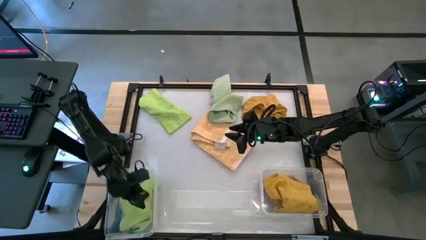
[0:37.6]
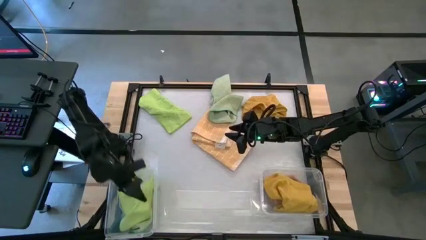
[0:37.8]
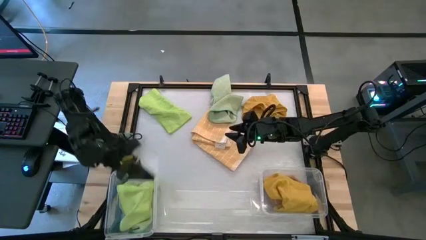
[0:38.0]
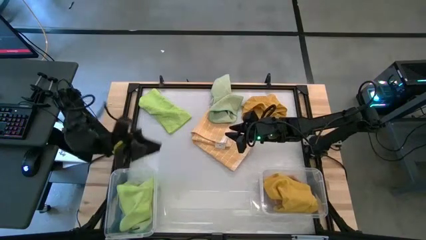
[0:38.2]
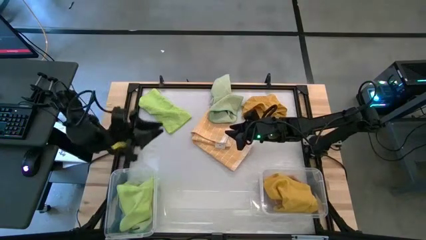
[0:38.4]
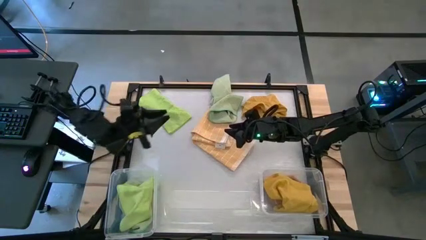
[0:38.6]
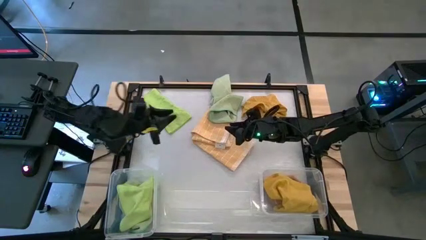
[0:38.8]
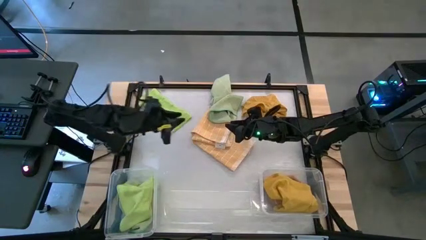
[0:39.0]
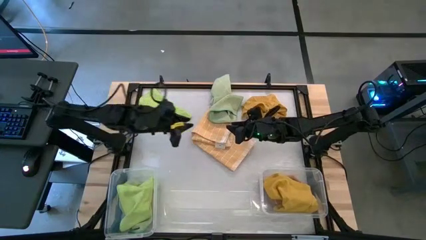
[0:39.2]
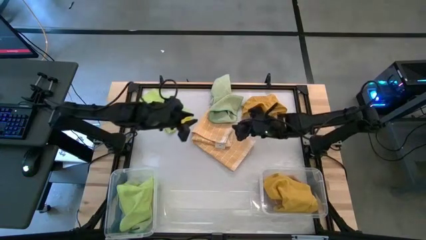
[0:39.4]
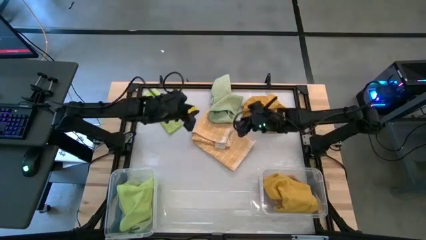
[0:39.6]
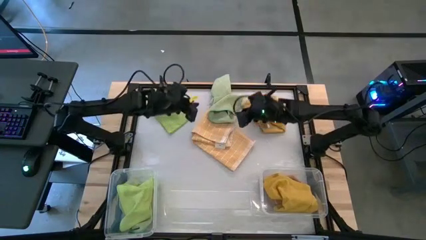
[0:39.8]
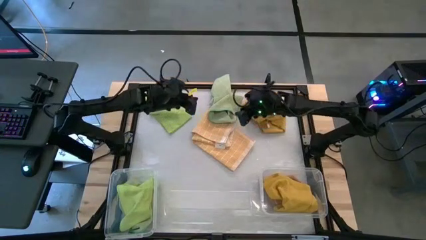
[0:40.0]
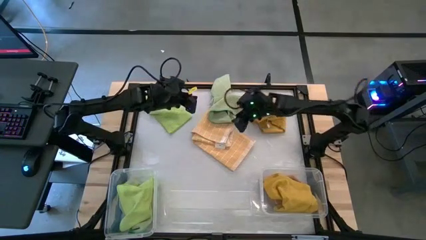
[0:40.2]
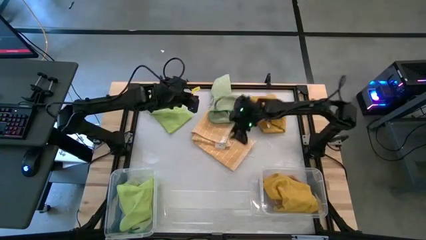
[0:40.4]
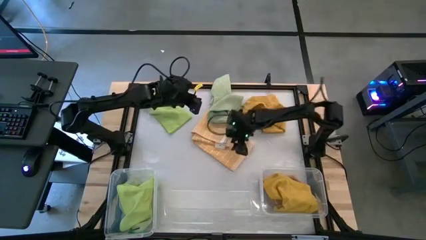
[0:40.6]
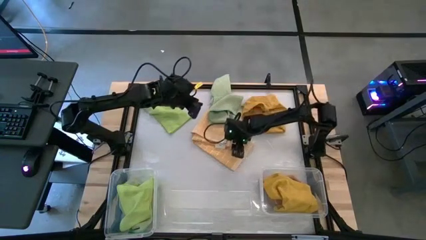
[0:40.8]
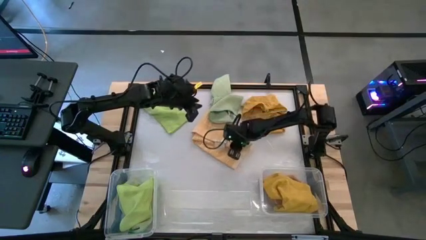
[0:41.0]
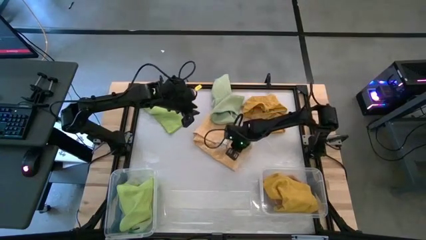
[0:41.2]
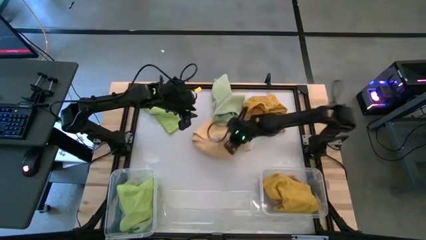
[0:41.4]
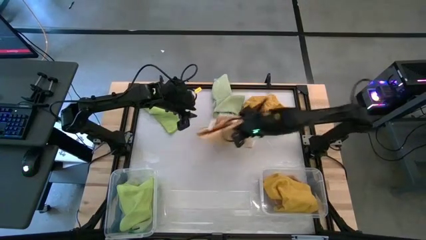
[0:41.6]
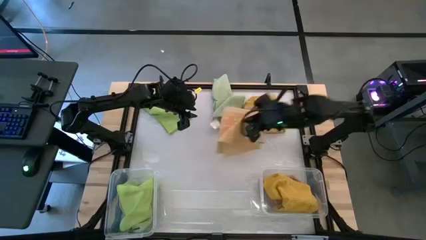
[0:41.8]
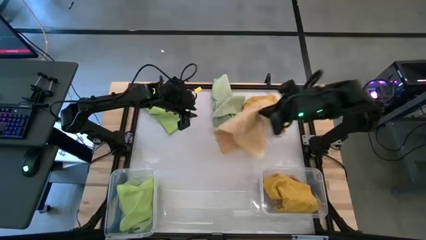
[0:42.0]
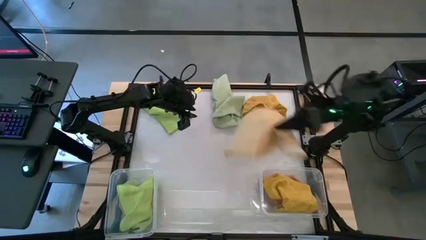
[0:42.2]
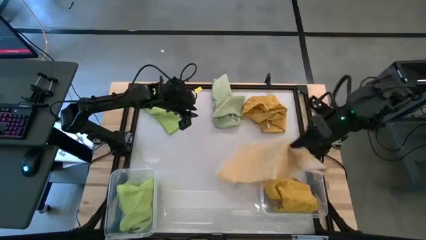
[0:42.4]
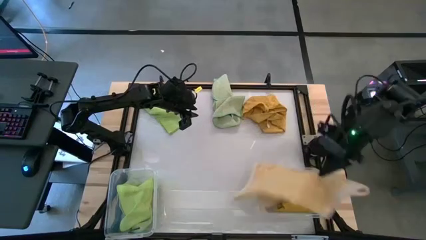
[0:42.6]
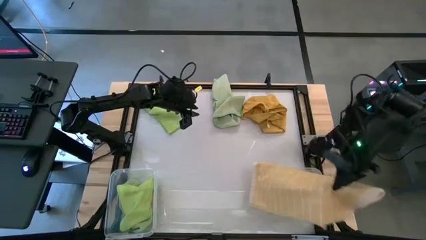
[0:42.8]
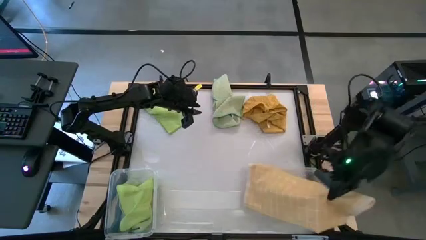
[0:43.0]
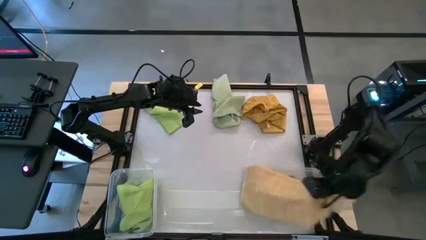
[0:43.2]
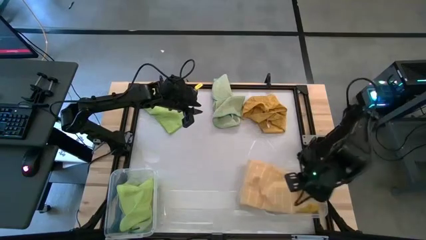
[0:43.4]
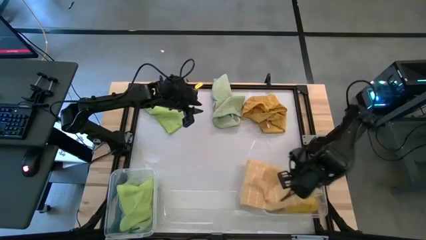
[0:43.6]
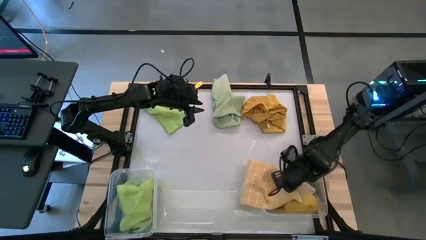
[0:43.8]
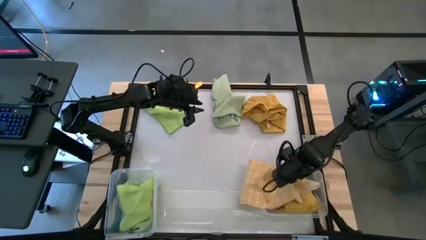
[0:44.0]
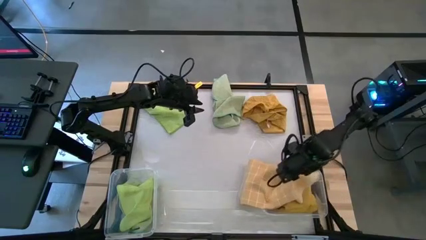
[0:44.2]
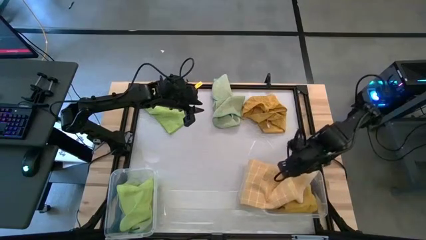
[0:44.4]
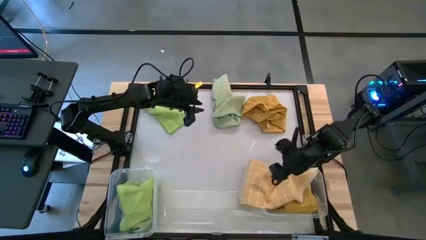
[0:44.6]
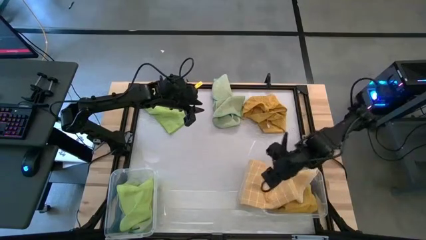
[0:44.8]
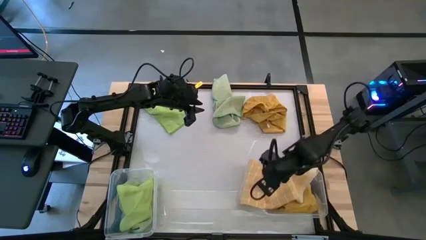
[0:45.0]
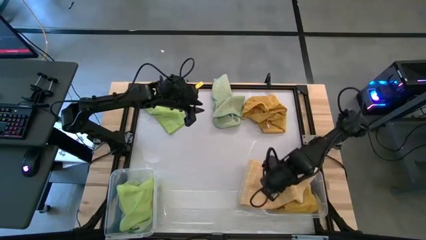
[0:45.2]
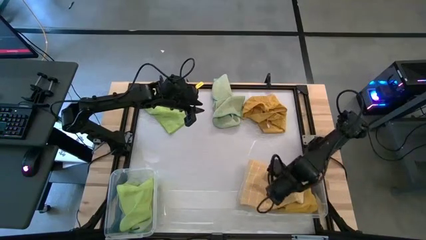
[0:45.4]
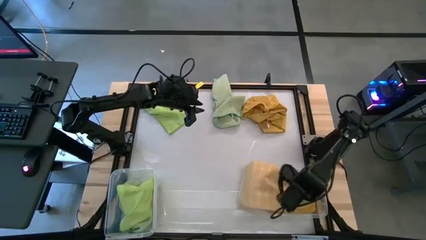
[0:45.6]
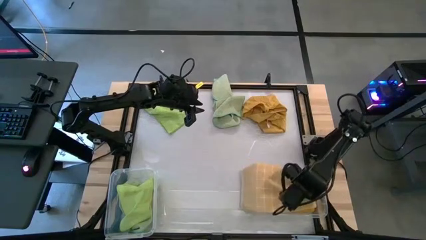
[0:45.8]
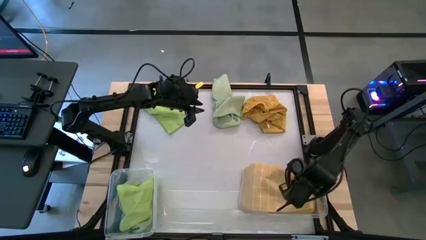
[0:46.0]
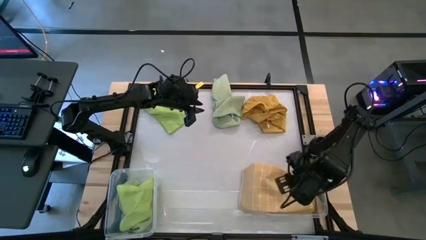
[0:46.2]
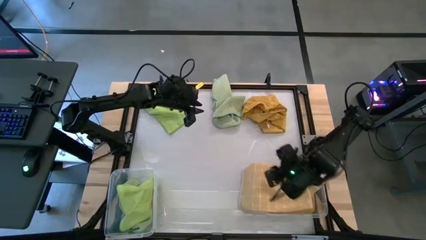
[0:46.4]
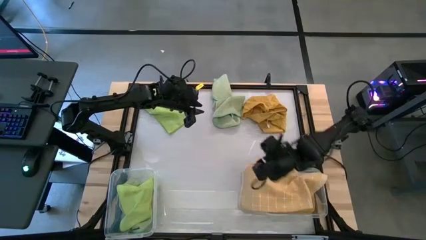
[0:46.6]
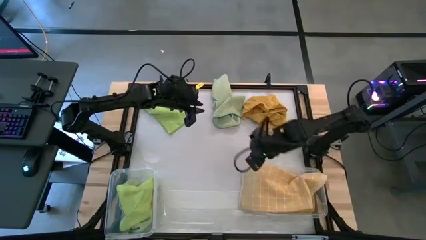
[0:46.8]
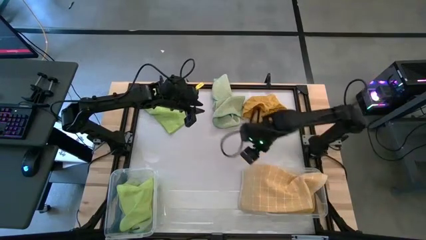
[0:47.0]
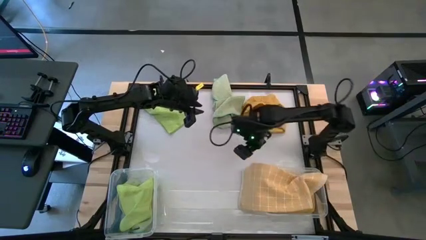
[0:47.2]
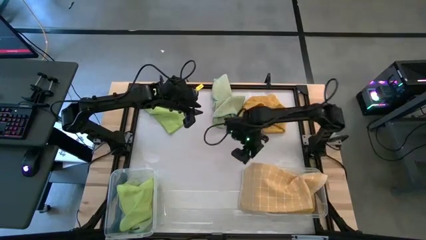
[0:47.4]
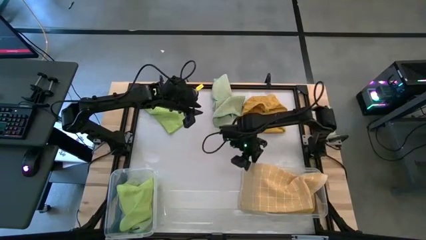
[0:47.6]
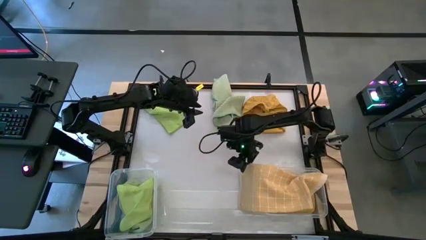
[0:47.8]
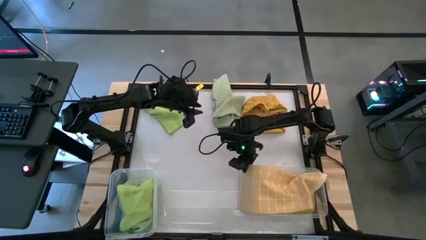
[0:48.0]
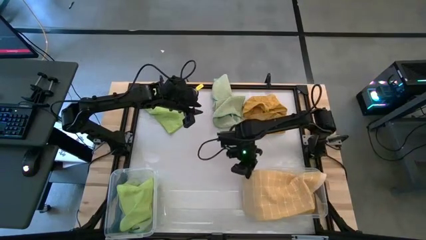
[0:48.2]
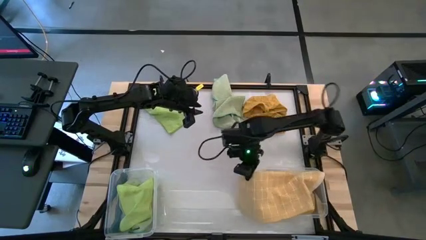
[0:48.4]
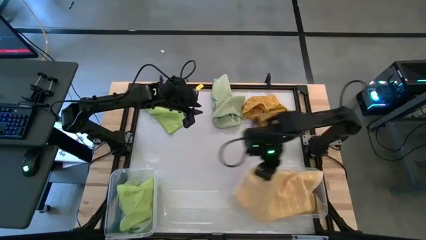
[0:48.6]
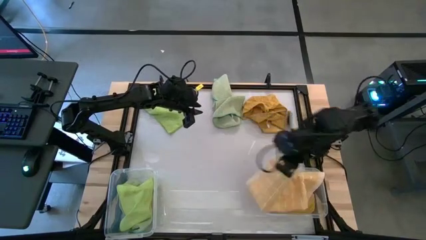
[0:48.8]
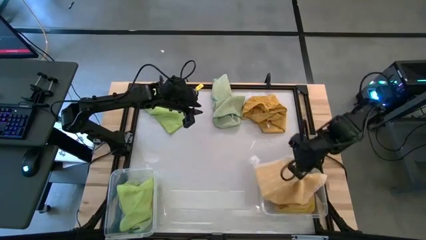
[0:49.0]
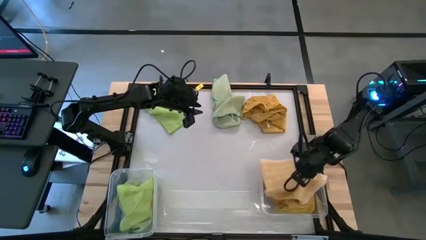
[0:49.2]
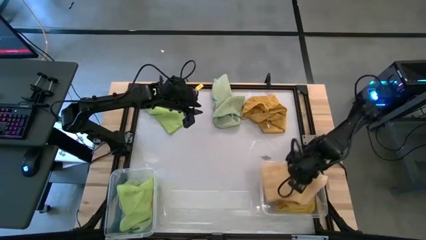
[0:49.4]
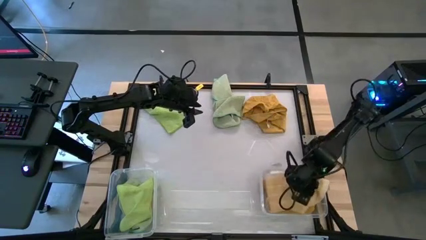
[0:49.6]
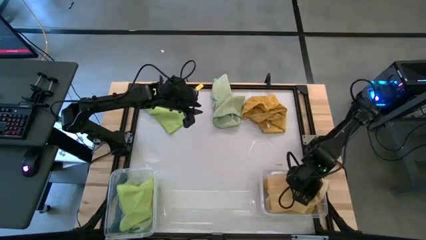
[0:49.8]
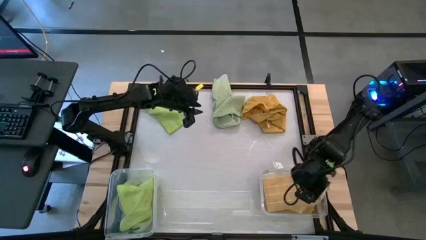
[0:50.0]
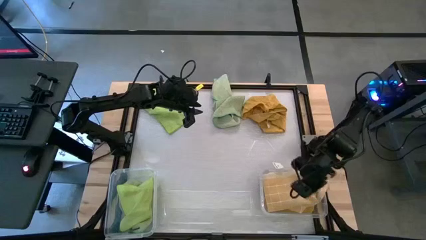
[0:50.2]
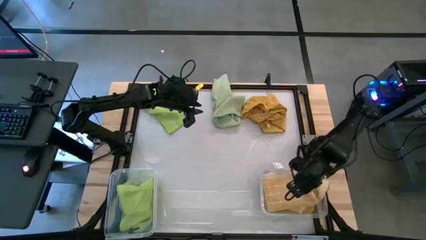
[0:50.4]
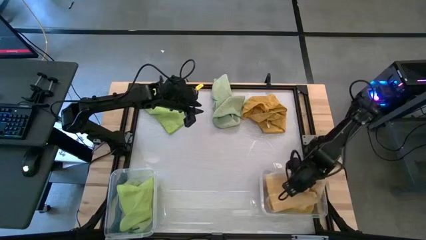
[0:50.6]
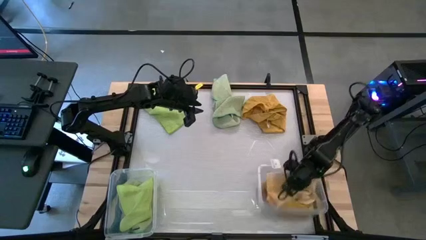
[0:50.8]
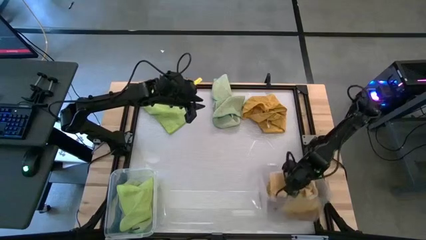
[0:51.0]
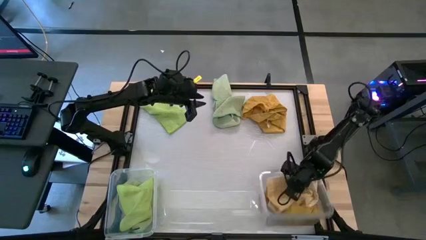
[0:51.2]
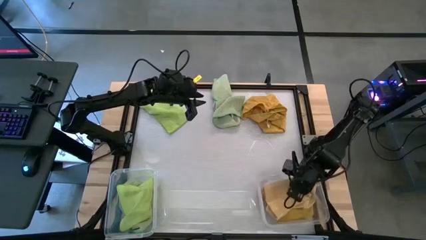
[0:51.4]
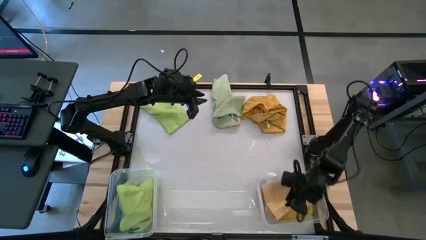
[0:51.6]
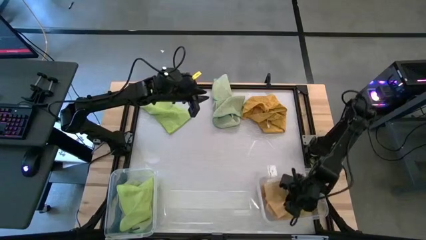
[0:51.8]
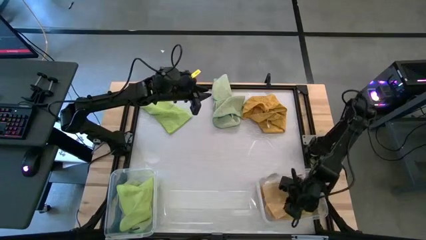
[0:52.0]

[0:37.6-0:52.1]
Task: Sort microfiber towel by color & place in baskets
Put the light yellow checkered microfiber towel into the right transparent bin
